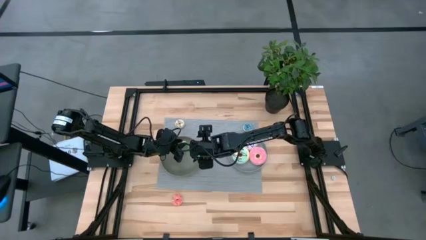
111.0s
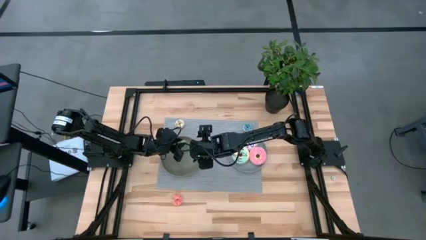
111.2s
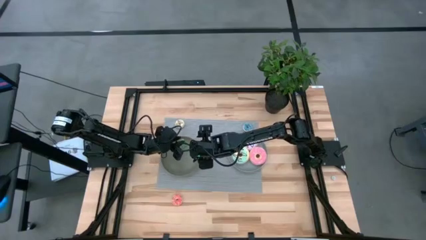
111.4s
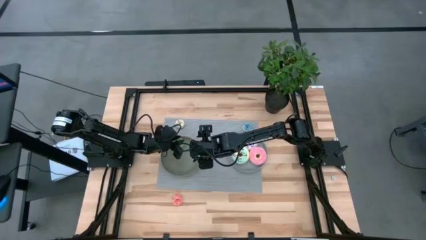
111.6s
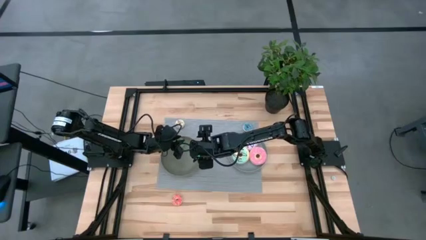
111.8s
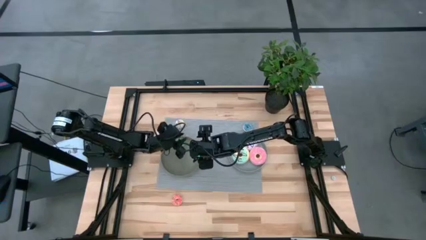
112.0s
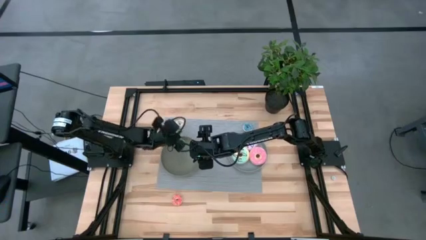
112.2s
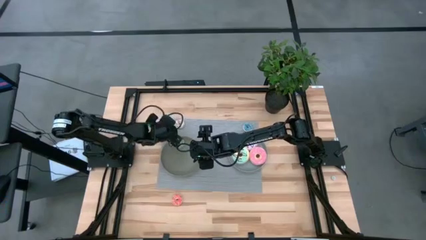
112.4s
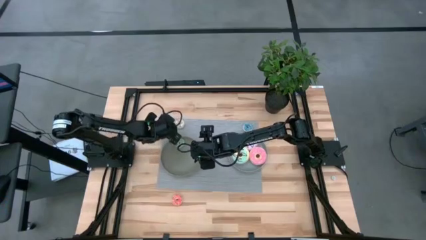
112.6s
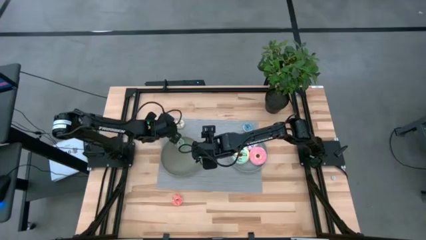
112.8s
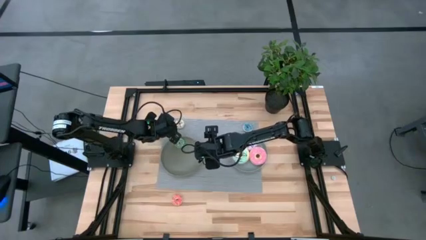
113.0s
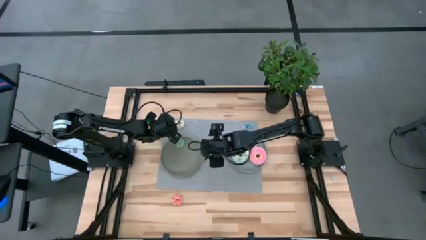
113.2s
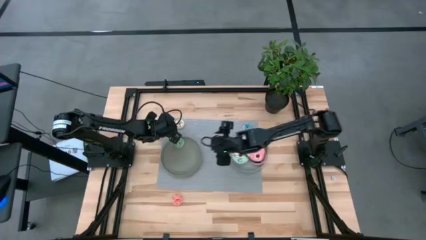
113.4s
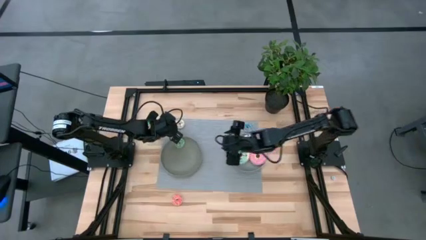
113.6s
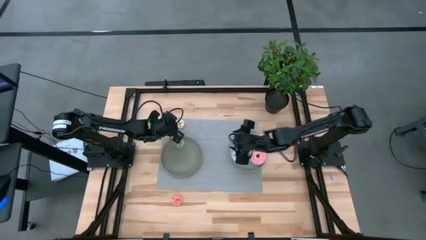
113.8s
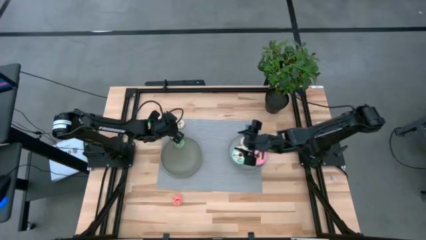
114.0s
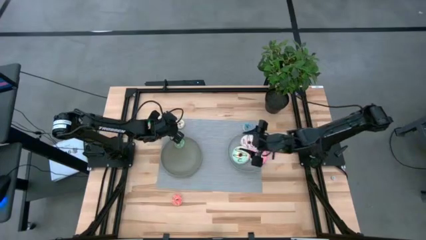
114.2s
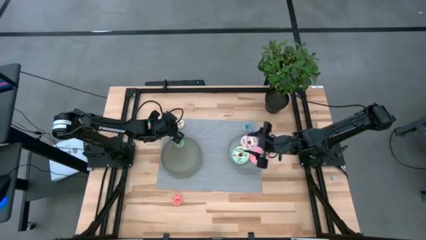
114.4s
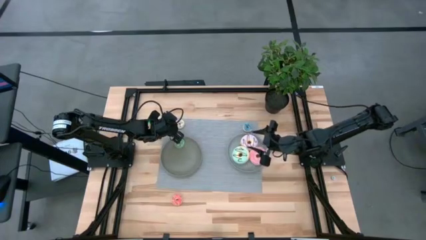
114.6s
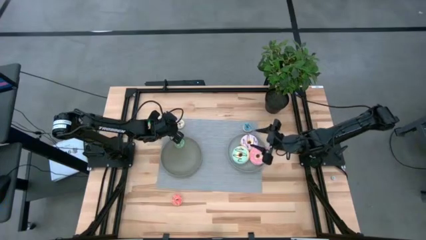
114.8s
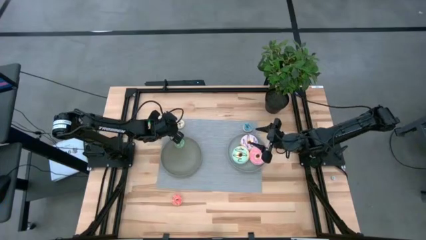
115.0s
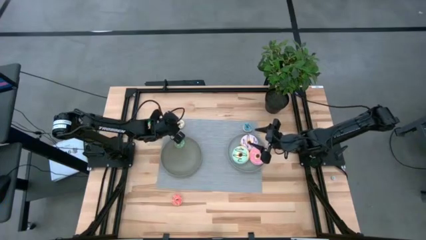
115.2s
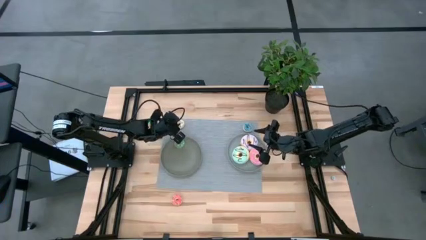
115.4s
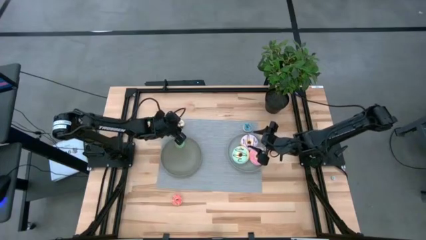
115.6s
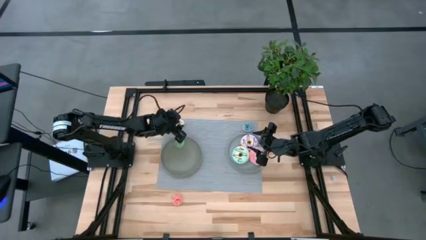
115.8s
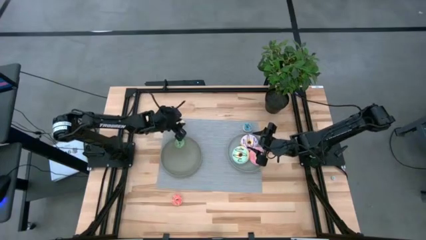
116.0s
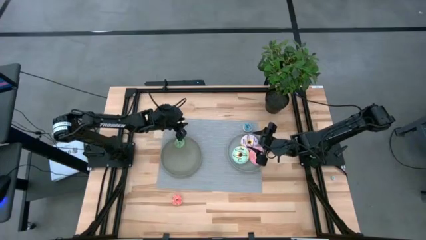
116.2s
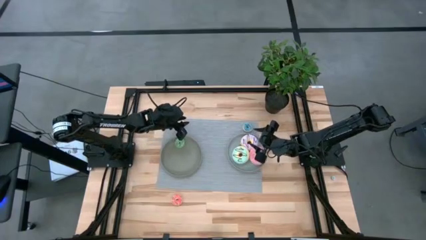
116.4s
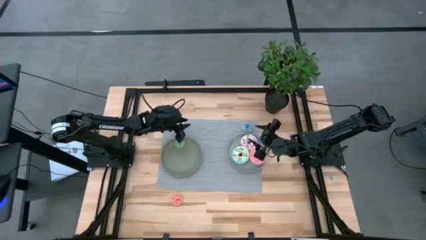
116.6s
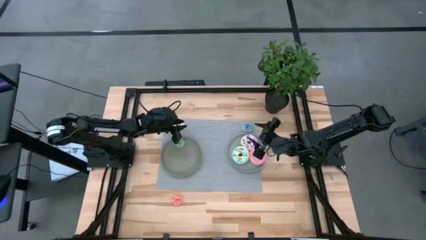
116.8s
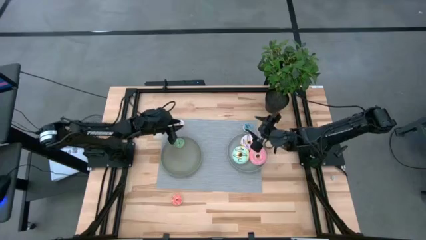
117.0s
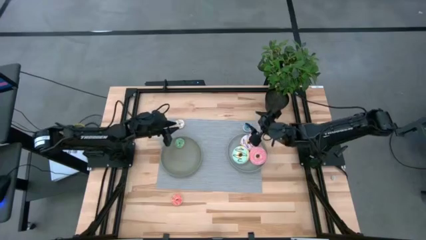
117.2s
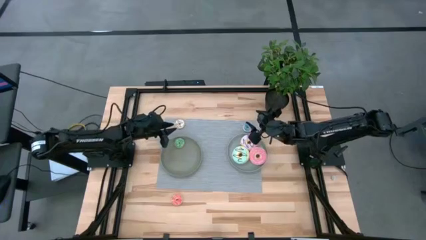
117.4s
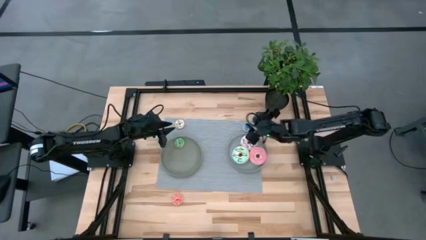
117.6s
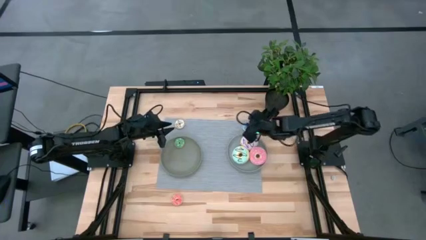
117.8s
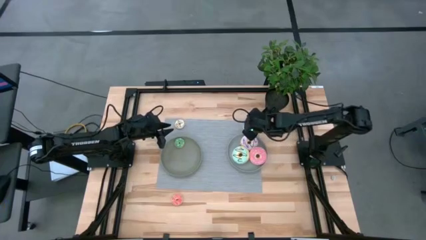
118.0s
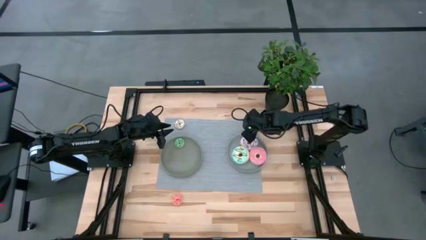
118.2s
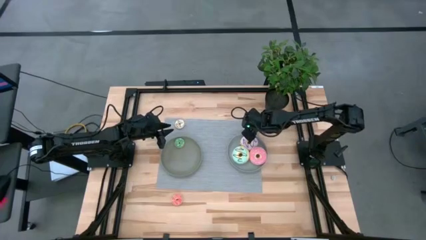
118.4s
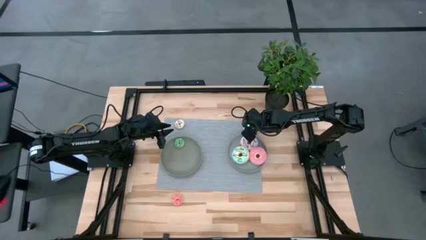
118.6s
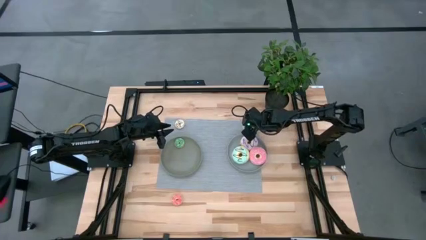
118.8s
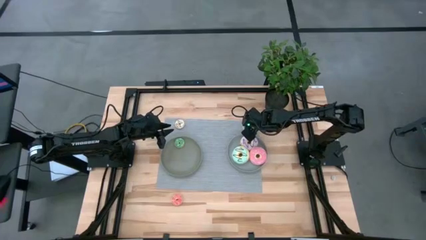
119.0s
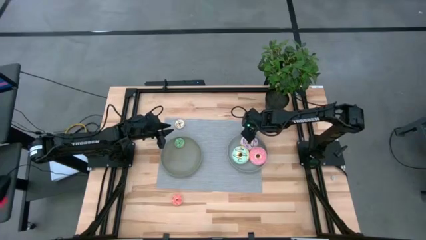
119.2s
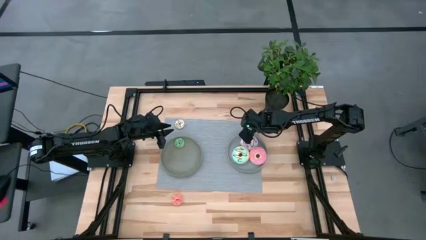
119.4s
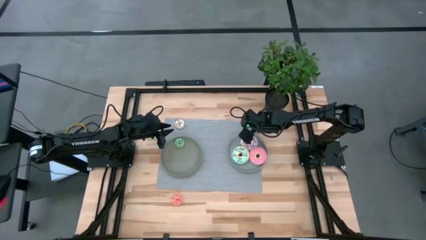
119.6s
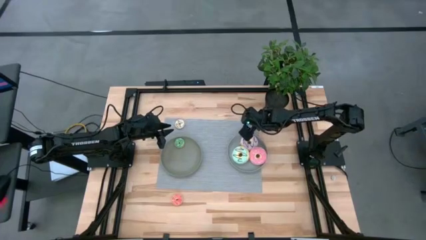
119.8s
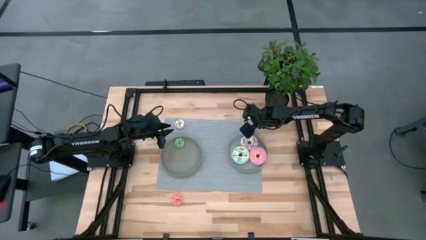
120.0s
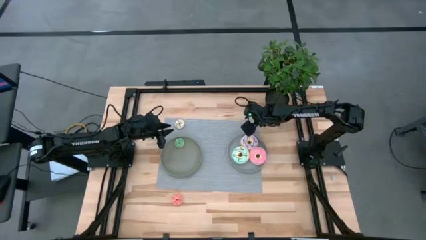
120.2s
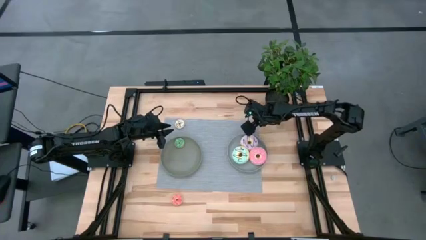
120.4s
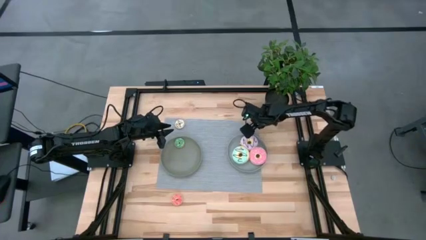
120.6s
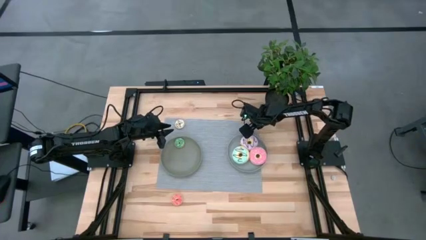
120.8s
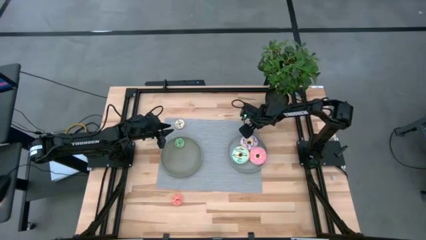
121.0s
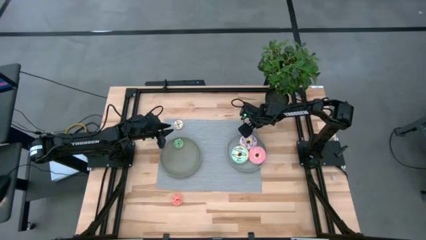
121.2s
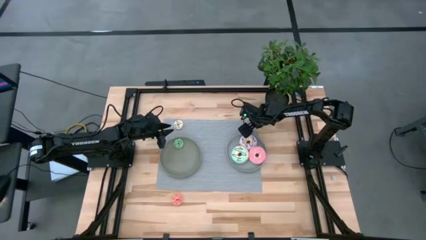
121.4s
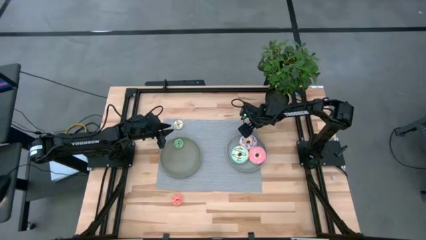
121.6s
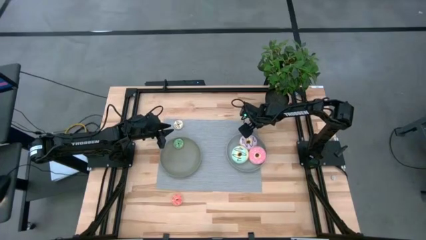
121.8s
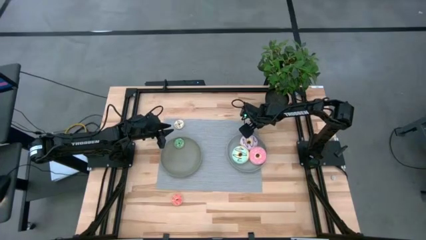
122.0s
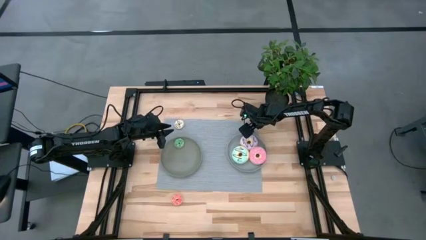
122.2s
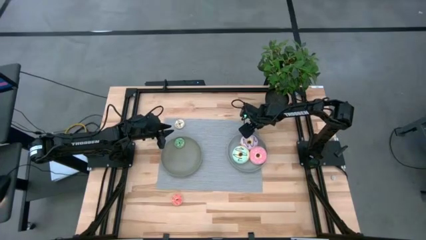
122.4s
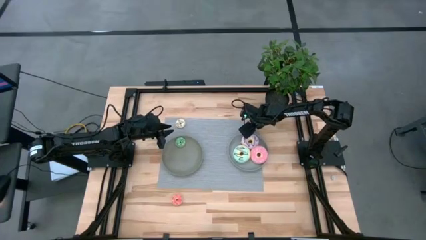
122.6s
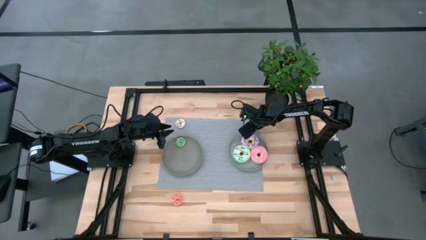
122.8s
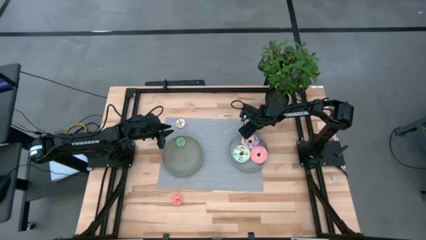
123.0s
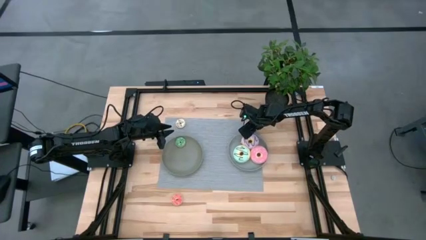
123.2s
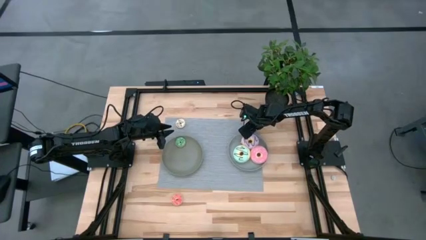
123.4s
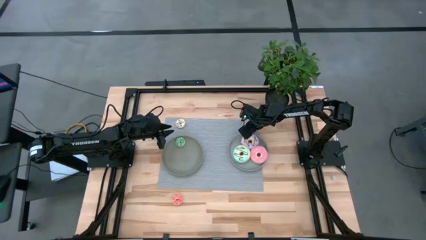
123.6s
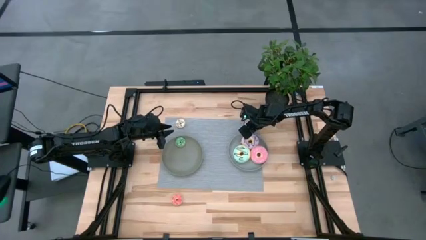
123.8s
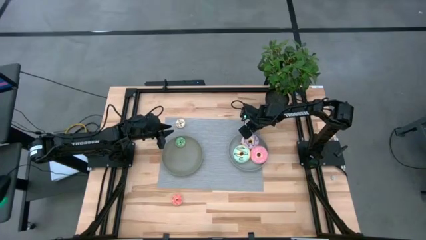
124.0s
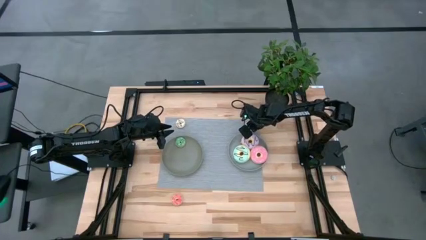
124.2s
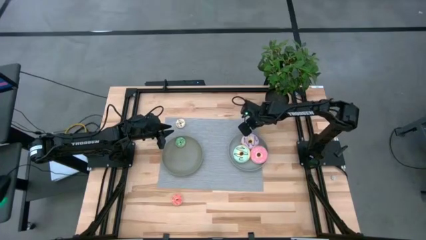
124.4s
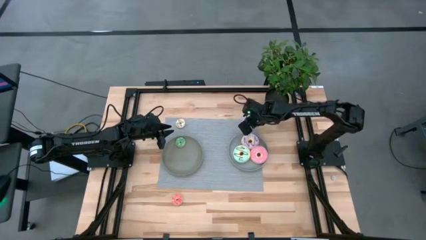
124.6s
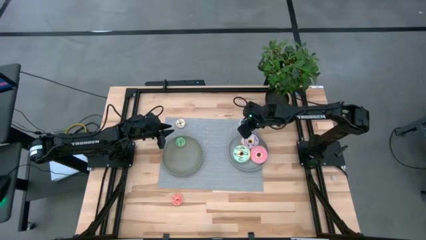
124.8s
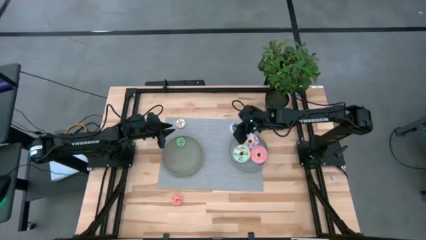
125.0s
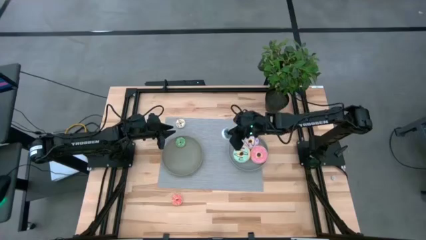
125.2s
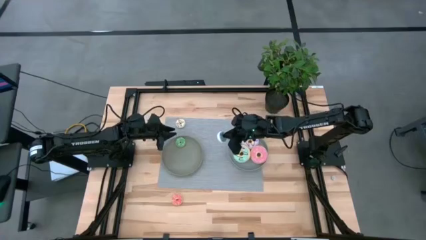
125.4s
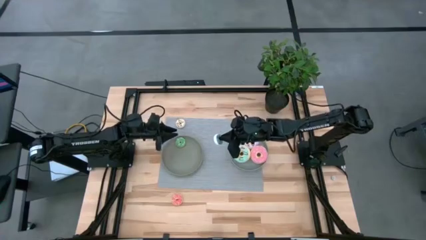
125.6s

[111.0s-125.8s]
Task: Pick & Place donuts
Put the small blue donut into the green plate

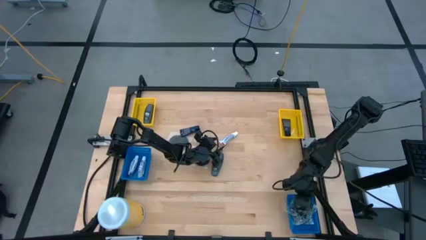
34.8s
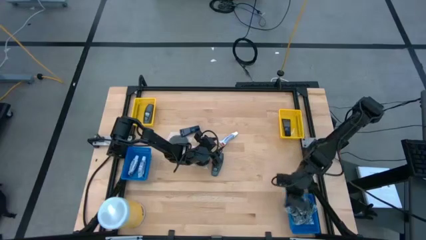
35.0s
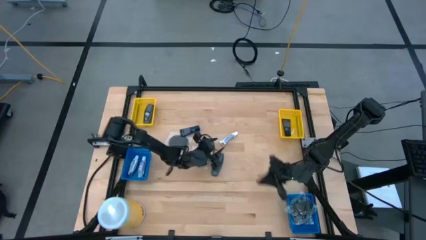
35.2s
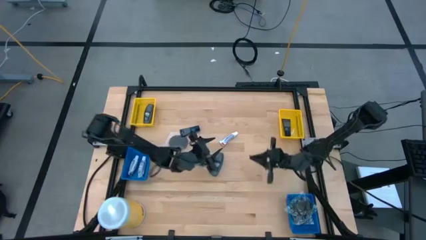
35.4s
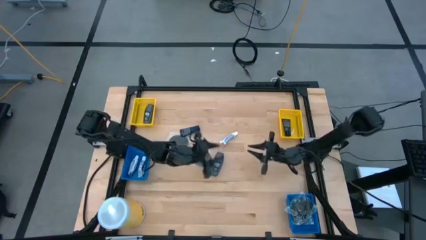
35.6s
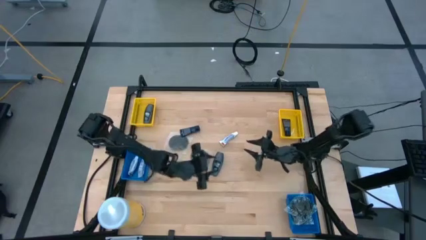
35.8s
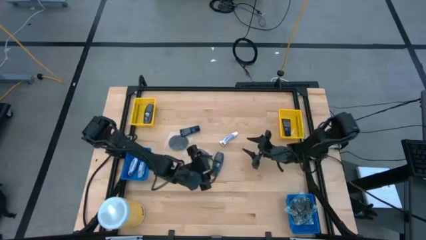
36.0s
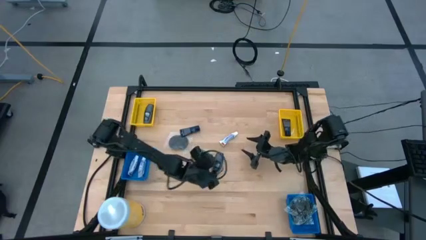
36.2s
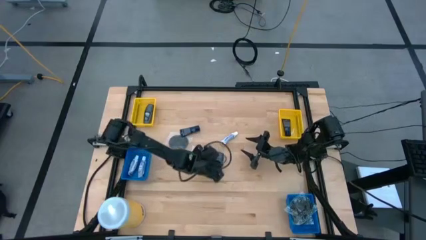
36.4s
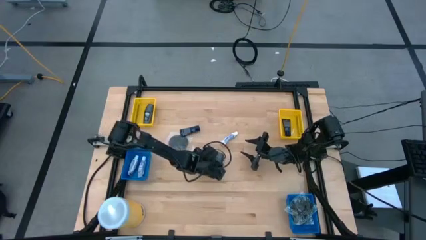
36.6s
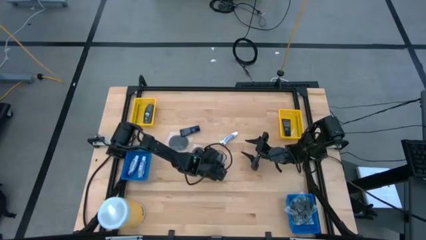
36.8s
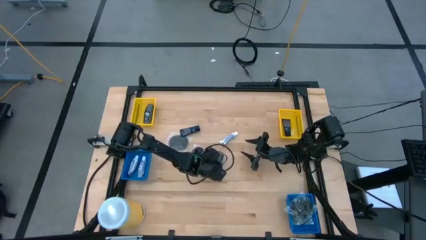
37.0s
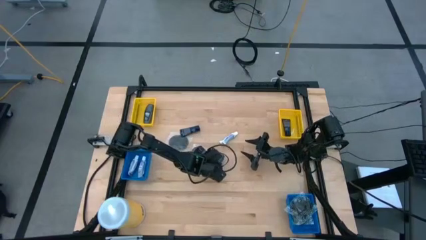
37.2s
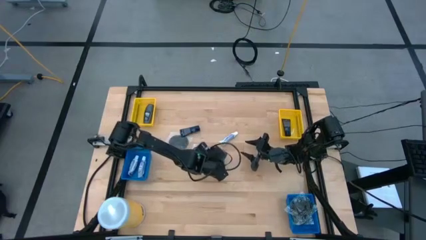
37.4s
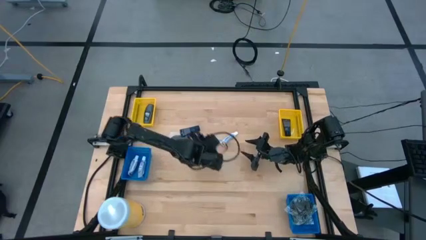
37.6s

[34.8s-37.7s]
Task: Pick & Place Travel size toiletries
Put the gray deodorant into the left yellow basket

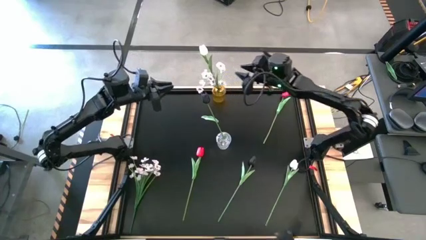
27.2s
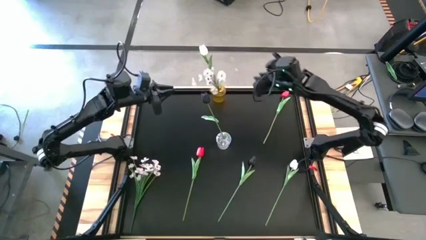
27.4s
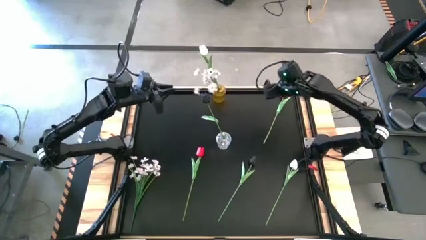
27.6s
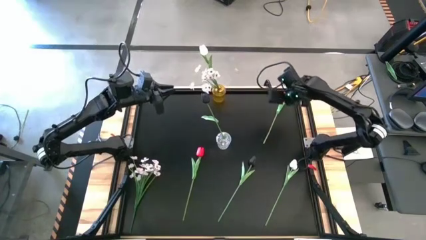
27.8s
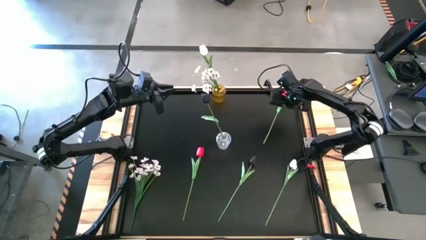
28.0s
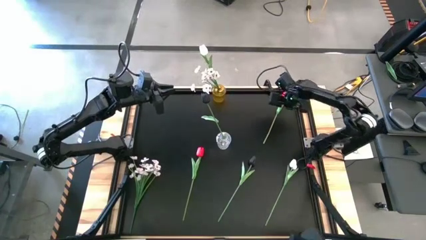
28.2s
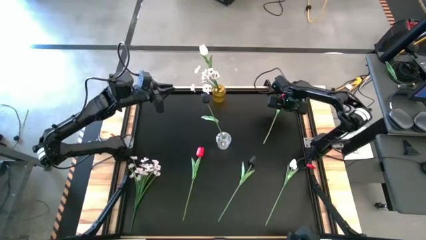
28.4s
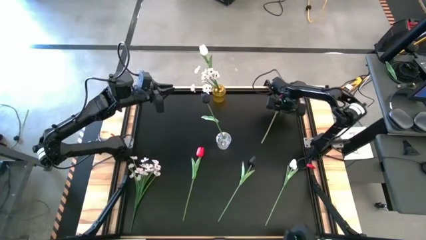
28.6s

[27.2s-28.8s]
Task: Sort flowers into vase by color
Put the top red tulip into the transparent vase
